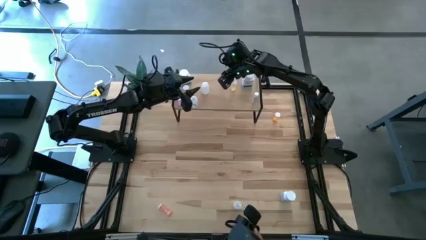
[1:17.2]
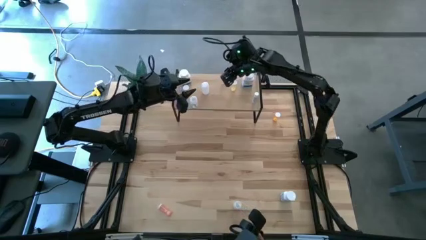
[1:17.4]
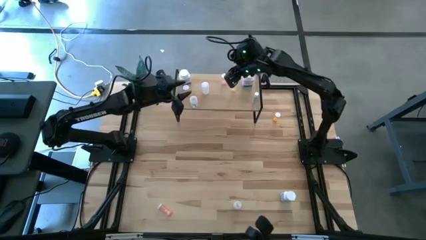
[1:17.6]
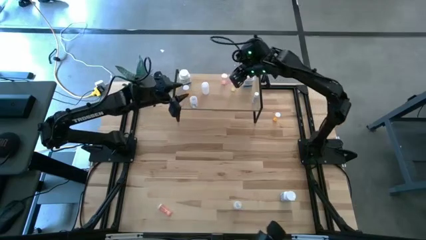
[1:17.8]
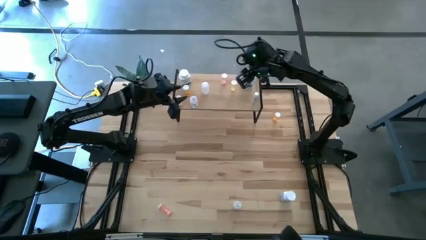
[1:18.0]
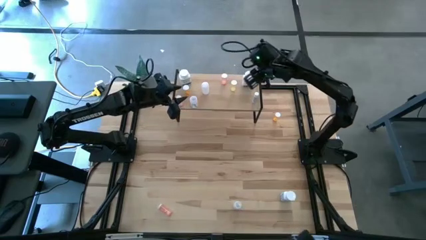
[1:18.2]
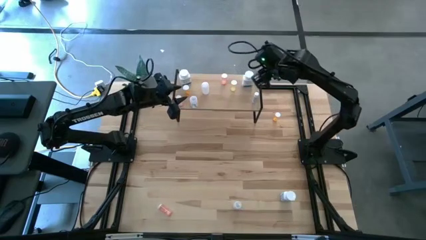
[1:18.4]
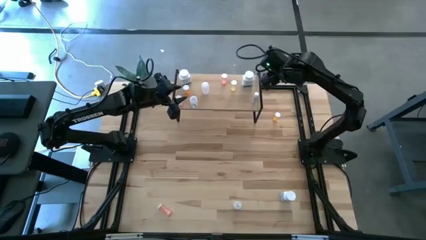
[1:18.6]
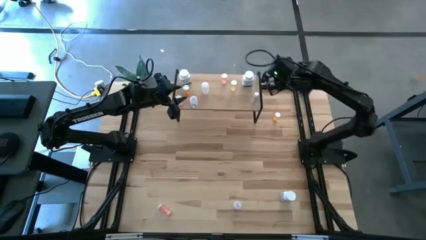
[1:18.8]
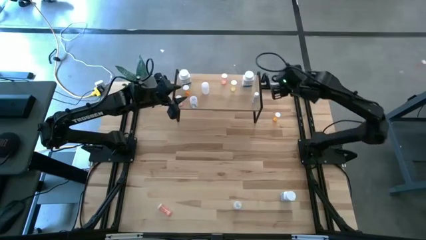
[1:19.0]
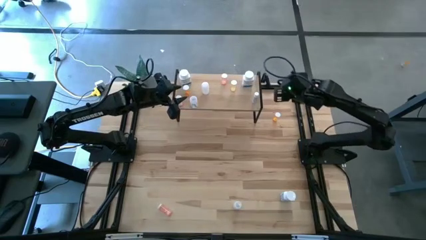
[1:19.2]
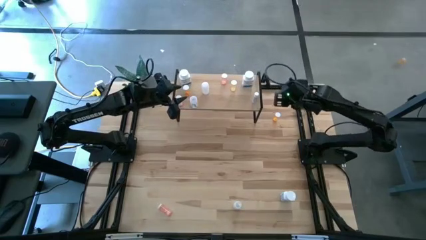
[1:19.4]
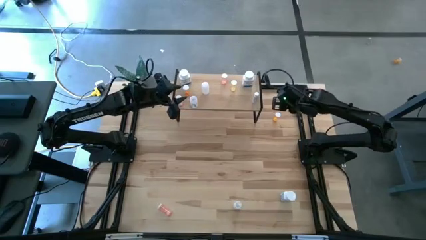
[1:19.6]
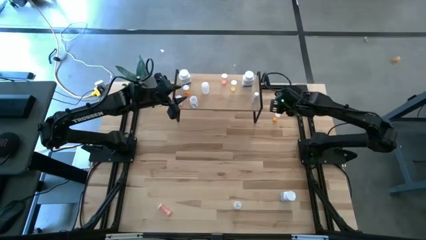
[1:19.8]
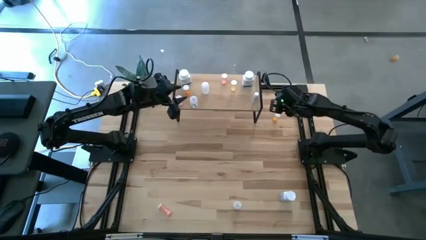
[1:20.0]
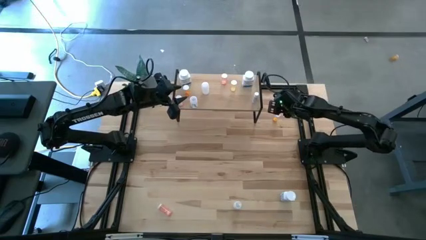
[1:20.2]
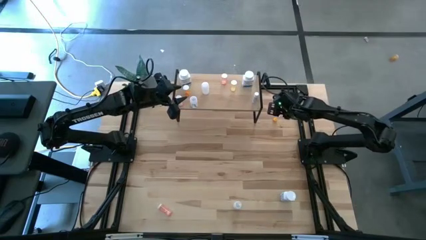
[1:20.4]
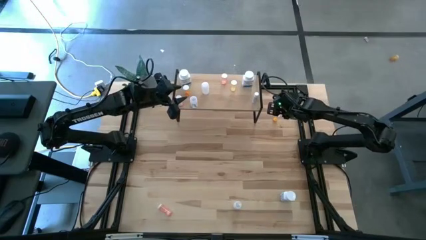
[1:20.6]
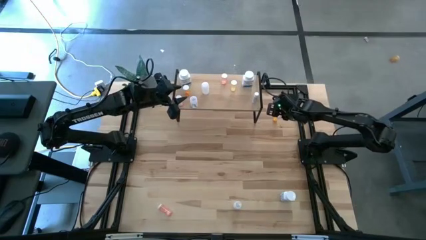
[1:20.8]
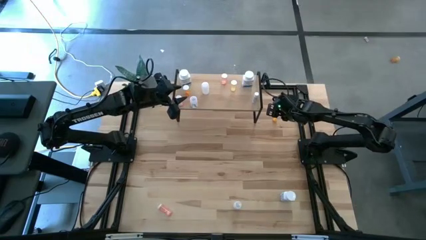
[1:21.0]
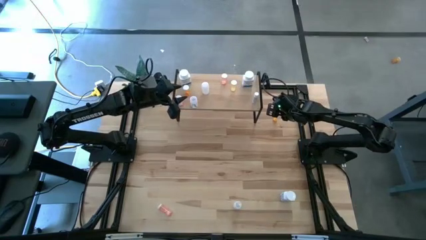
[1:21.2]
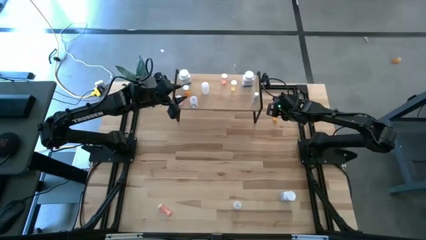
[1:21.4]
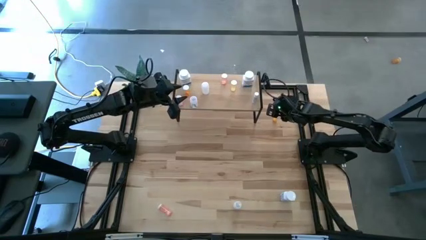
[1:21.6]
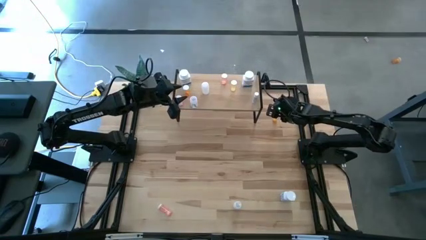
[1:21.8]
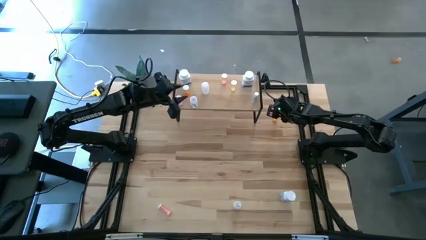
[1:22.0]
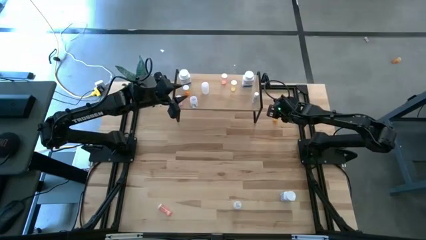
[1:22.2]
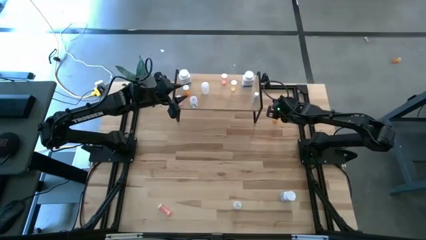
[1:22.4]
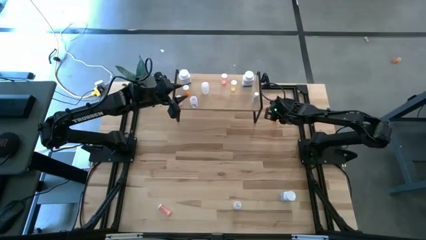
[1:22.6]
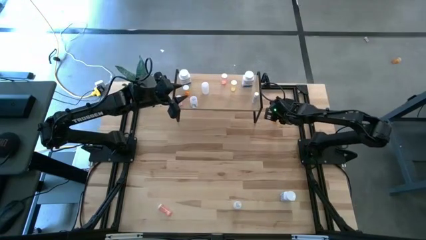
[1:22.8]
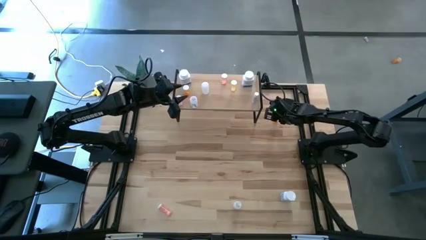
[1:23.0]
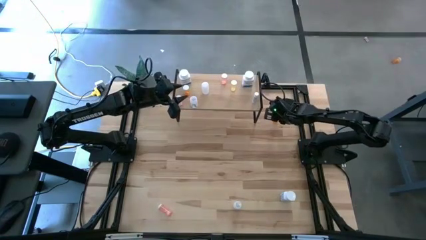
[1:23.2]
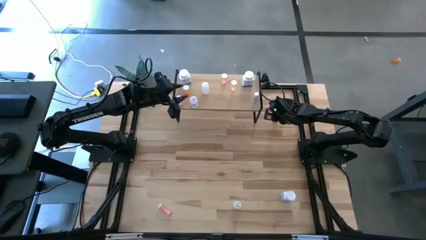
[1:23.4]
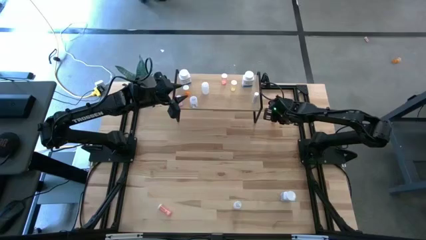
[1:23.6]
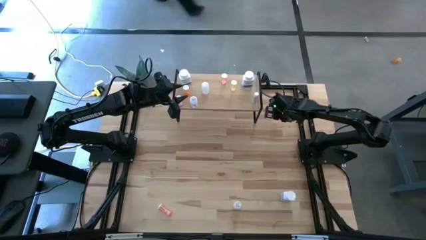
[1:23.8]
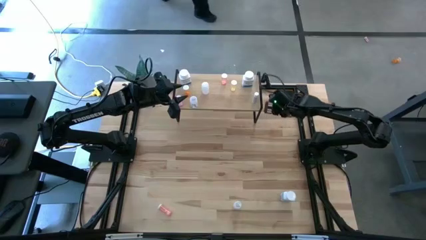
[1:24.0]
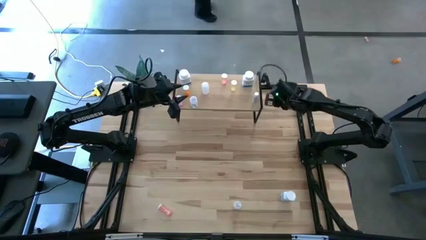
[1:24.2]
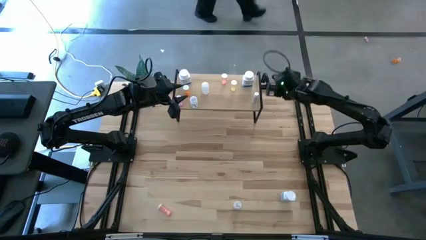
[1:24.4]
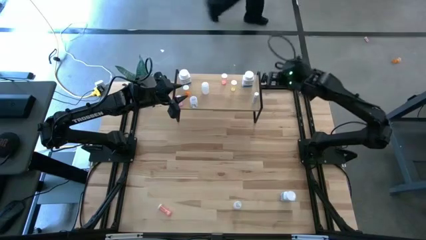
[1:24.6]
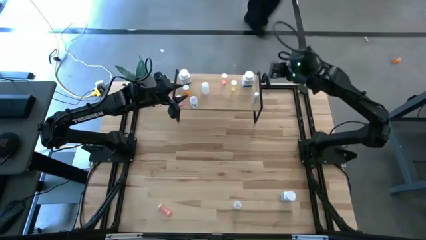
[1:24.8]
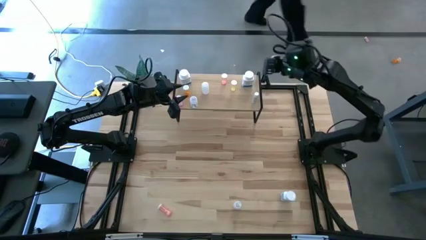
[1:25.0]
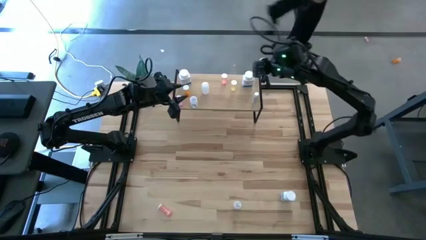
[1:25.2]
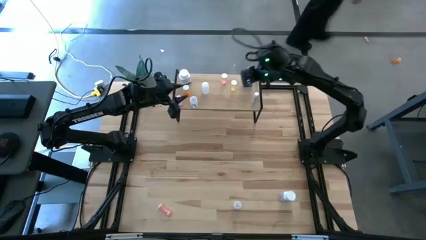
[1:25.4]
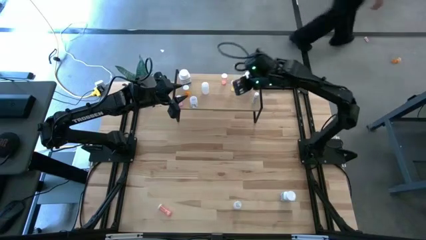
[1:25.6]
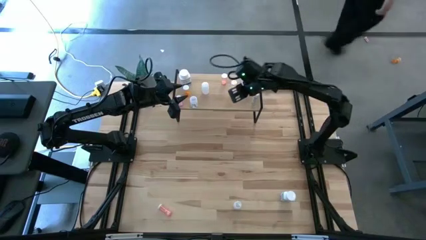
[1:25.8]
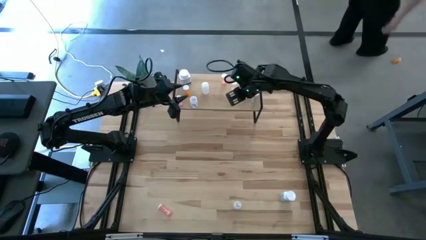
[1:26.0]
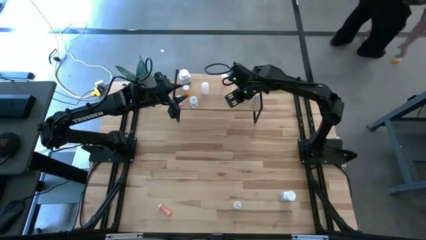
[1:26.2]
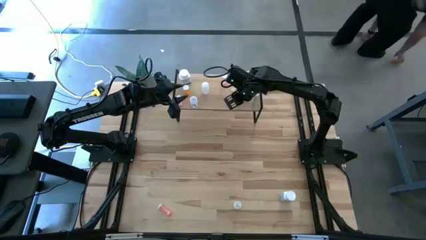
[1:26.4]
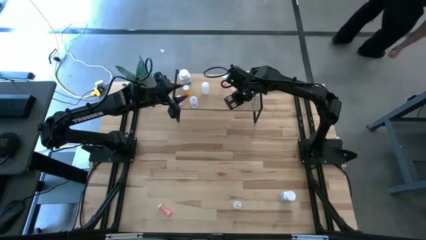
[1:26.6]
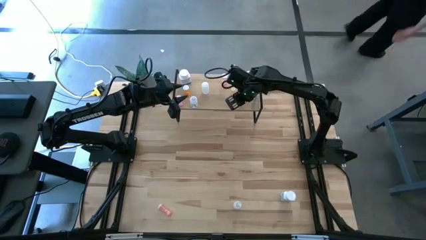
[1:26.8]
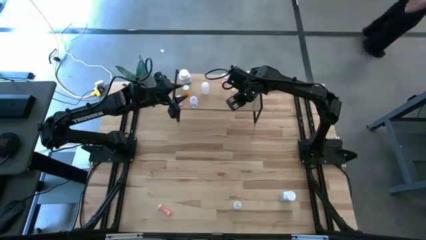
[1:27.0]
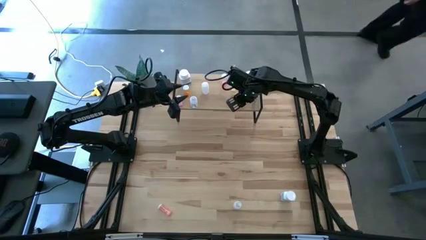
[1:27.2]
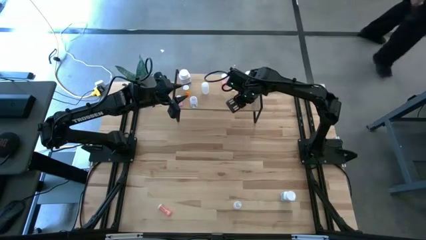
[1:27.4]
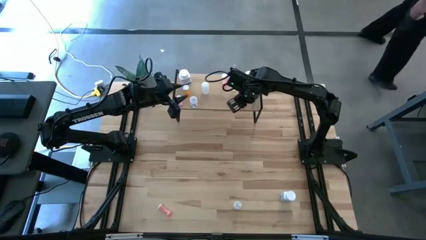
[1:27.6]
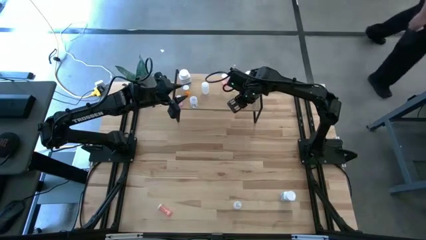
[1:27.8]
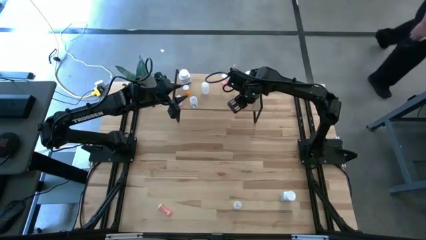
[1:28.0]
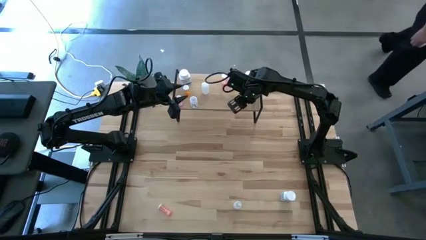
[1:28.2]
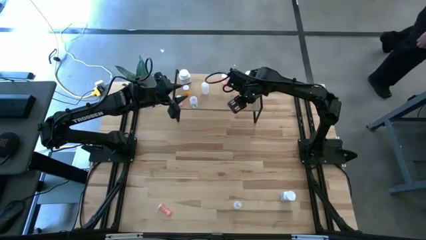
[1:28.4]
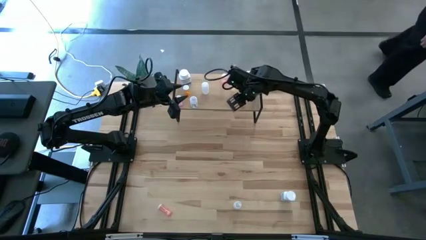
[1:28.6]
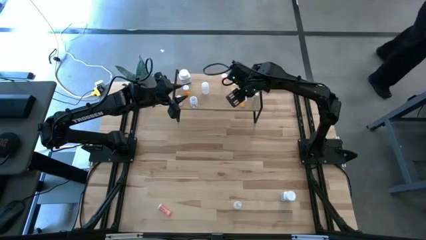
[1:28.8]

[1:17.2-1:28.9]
Task: Pick and place medicine bottles onto shelf by color
Put the orange transparent pill bottle on the shelf

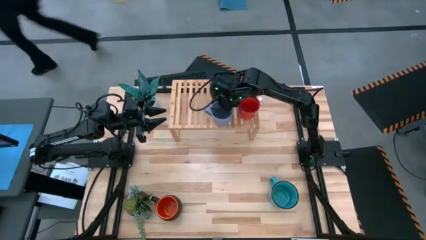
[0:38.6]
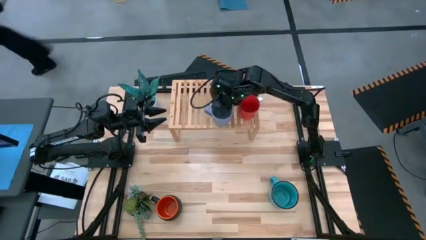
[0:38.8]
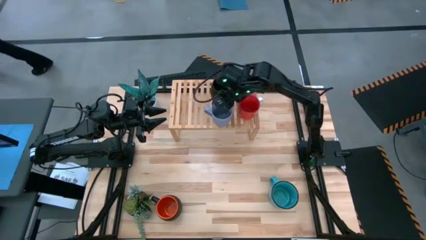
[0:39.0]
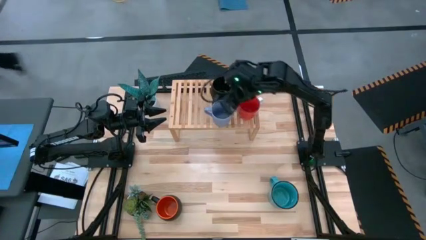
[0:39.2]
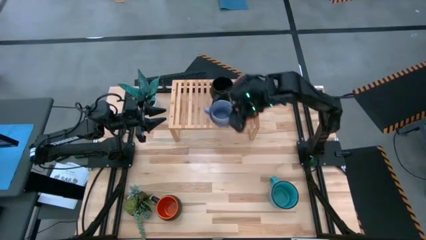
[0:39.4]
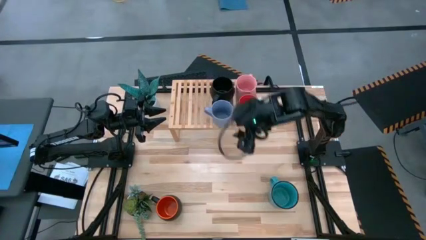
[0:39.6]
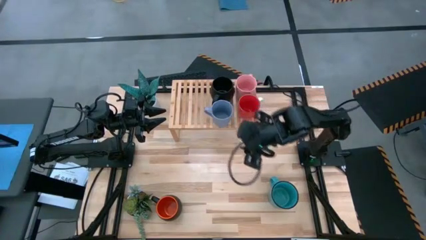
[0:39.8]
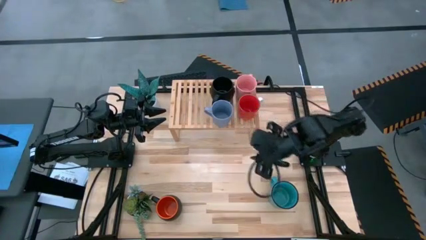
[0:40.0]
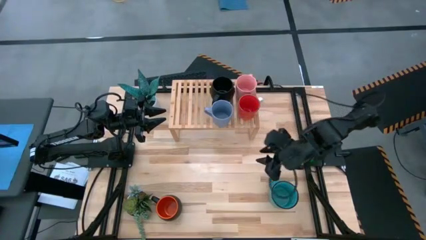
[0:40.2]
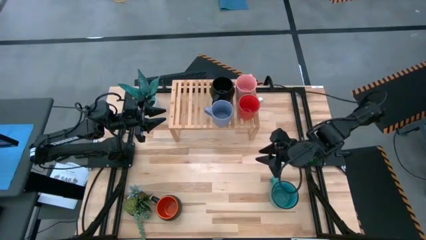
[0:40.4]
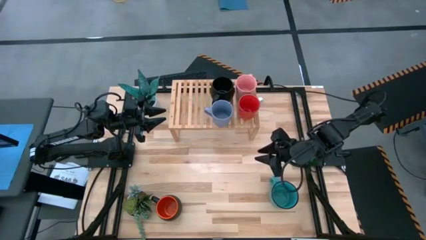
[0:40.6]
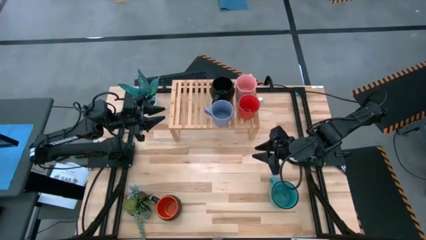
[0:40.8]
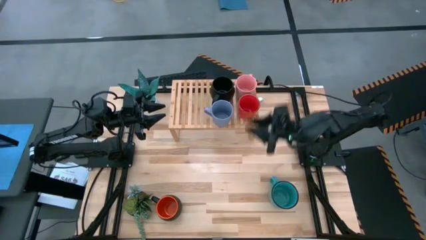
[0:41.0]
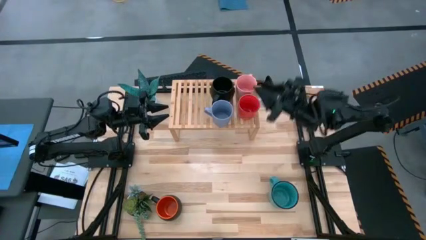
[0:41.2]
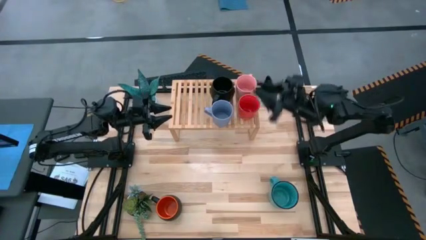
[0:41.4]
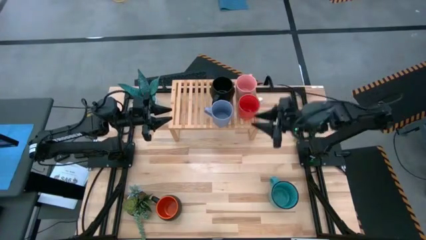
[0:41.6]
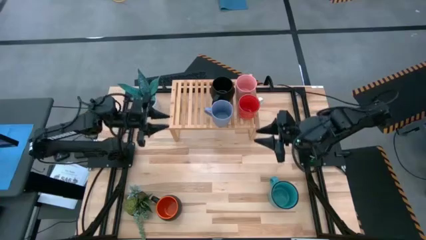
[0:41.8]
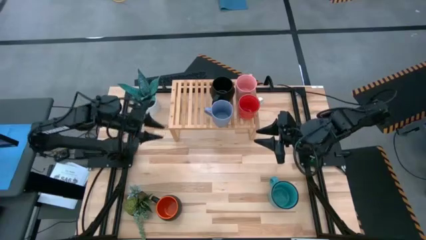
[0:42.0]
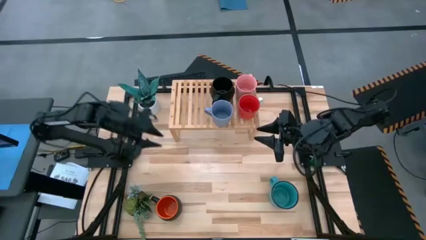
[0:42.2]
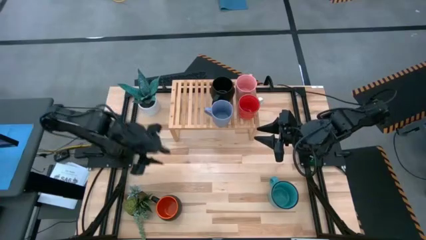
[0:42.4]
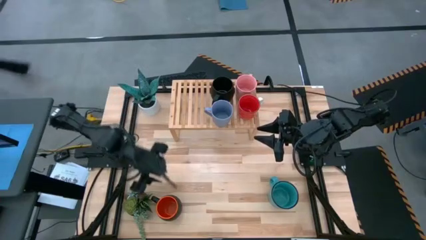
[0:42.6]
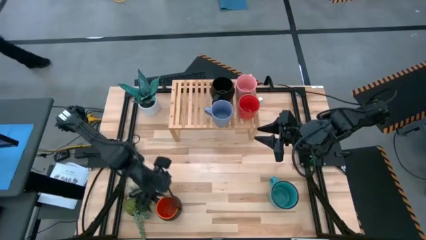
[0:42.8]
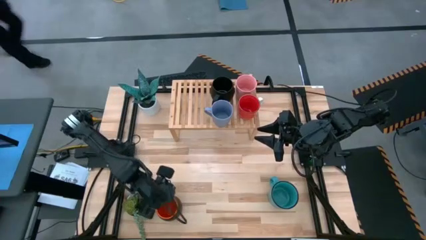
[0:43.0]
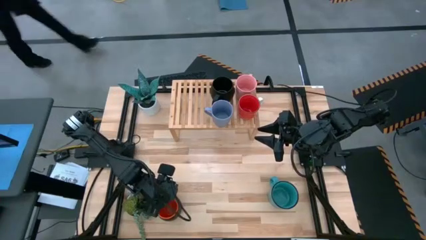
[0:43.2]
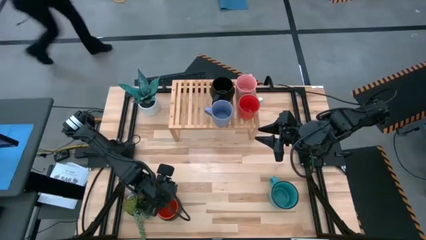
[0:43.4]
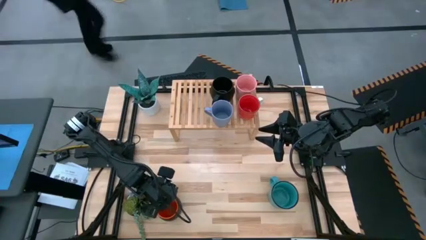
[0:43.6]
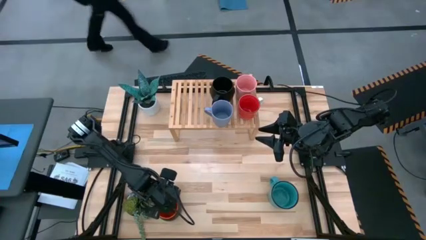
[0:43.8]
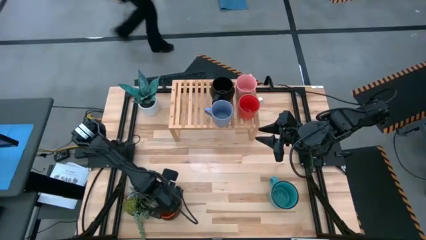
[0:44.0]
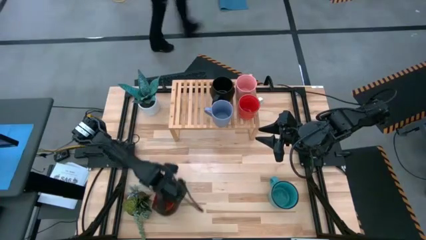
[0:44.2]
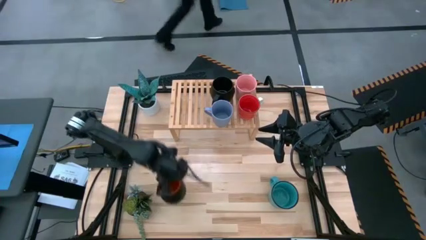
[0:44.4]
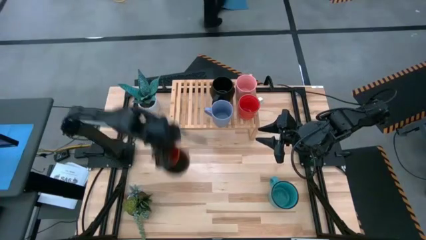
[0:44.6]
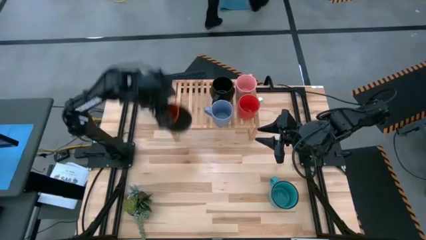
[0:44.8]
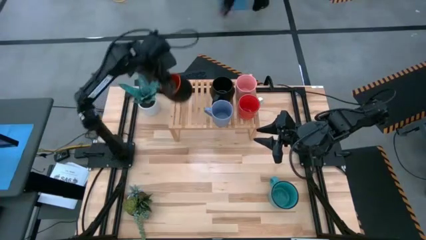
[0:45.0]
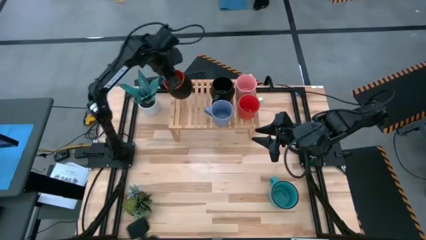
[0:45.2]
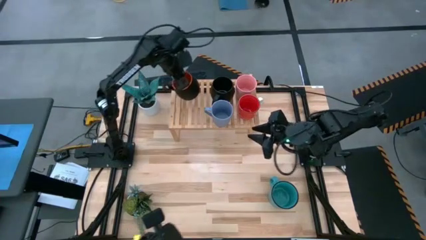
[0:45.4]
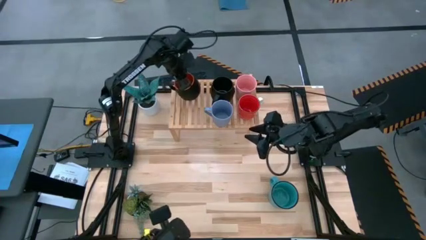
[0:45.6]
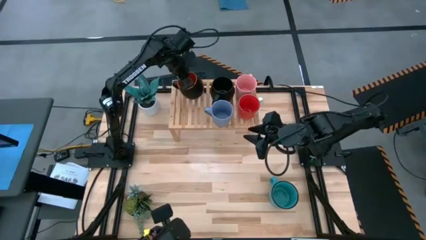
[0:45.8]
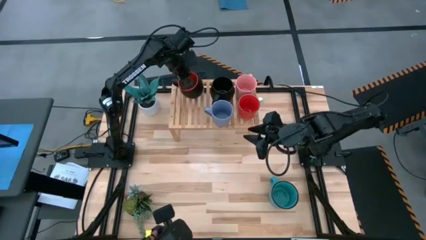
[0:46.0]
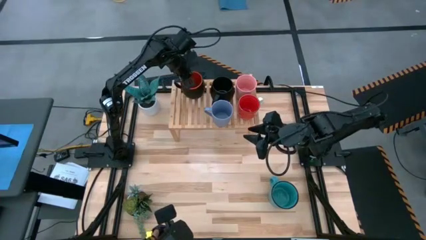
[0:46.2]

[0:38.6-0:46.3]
Task: Place coffee mugs
Put the orange black mug on the shelf
